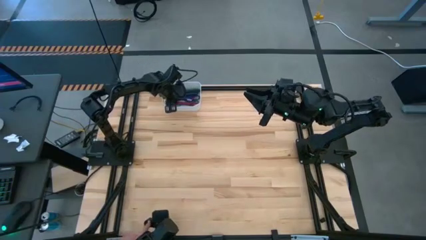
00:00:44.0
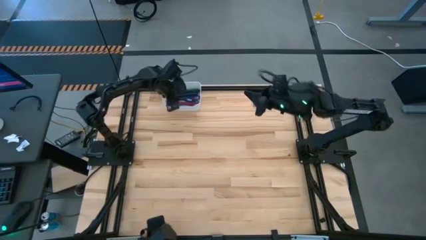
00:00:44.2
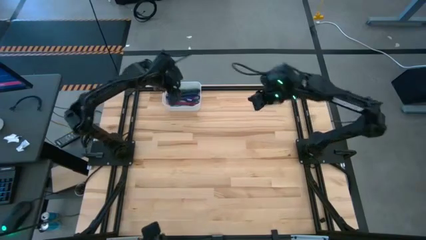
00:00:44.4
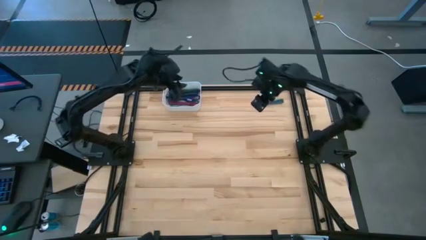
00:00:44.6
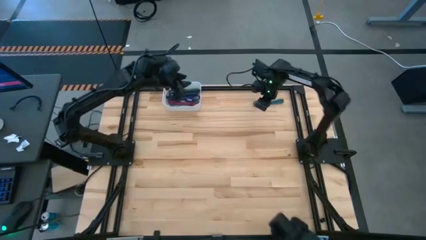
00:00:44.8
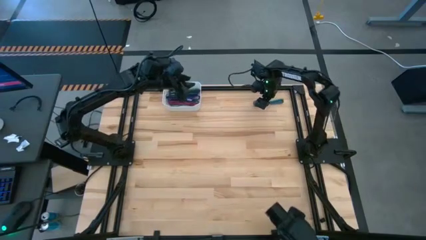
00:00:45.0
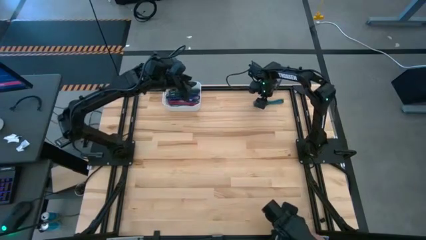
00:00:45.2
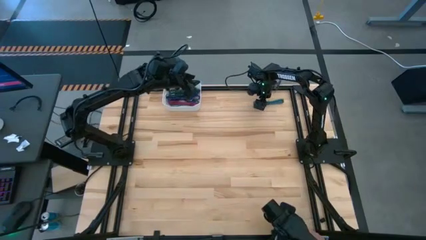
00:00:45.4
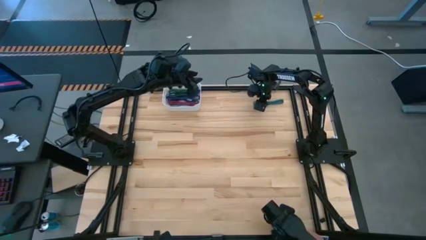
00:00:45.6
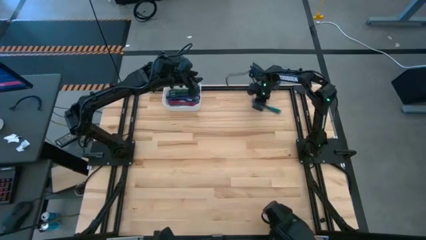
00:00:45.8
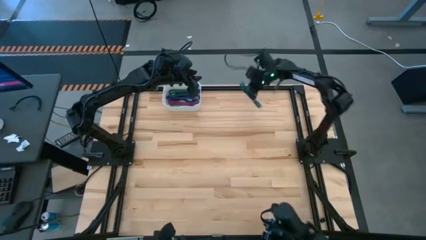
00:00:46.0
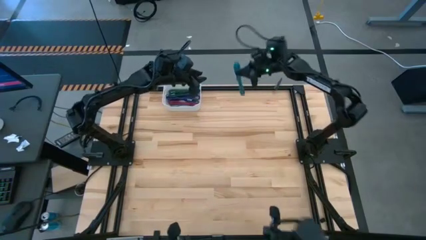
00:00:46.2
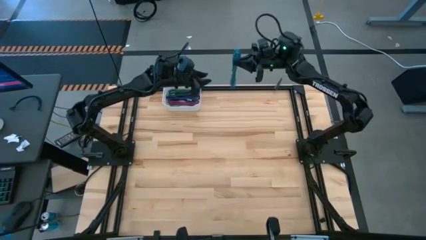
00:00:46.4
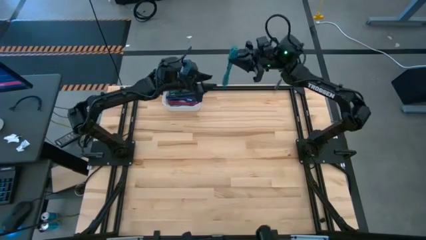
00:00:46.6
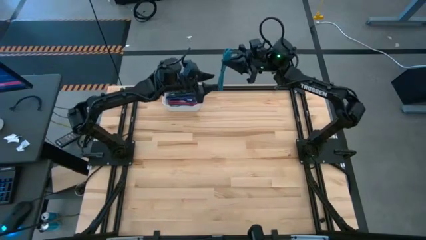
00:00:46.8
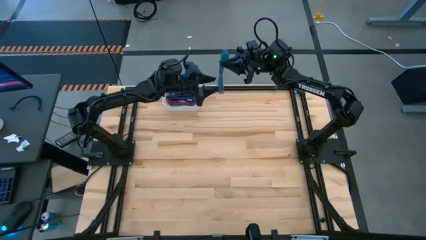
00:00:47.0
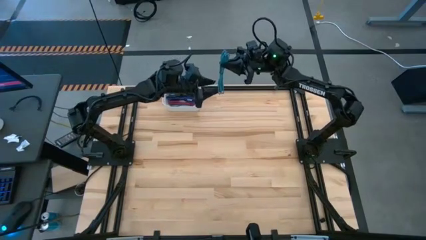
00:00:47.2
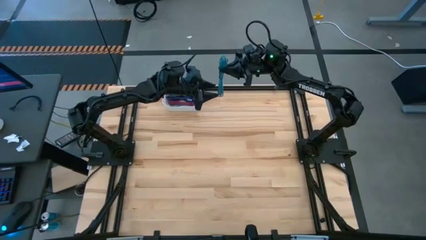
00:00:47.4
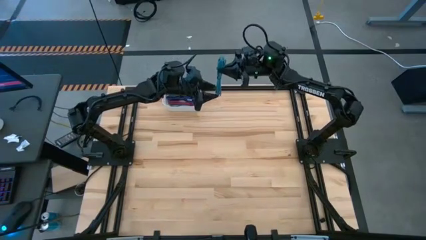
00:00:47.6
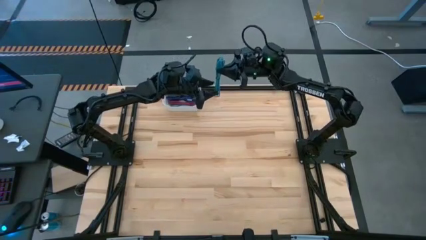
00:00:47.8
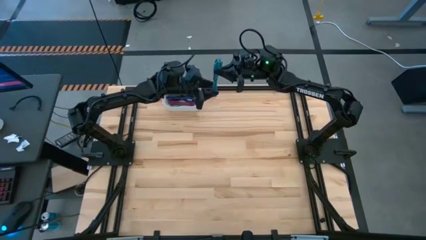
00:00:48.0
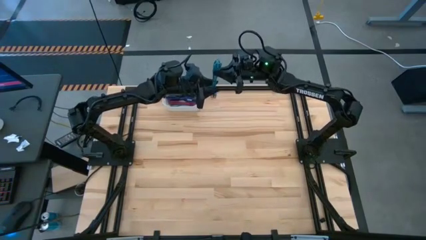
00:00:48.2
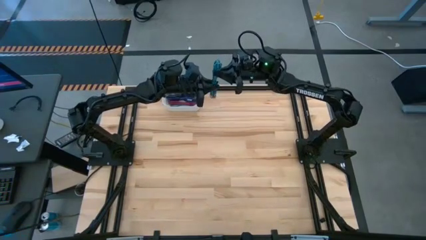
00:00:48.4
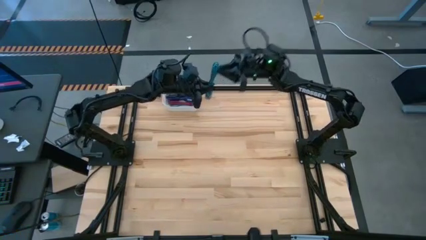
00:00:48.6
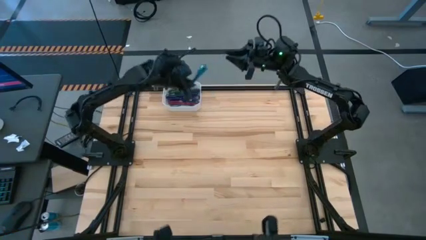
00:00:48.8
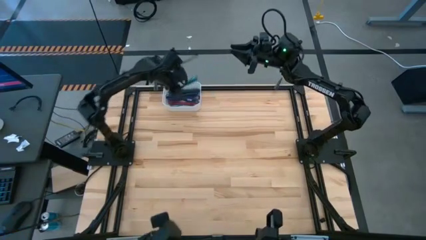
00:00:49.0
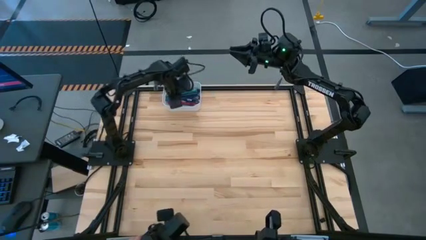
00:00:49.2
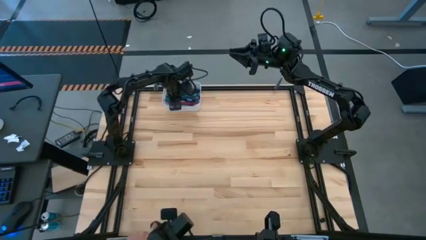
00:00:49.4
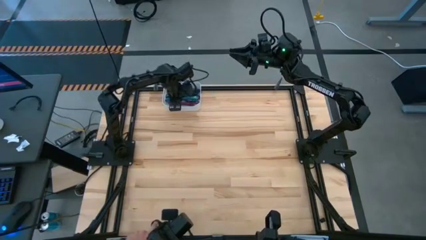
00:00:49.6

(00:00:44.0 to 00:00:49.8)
Task: Pick and place USB-C Cables
Put the blue charger cable into the white bin

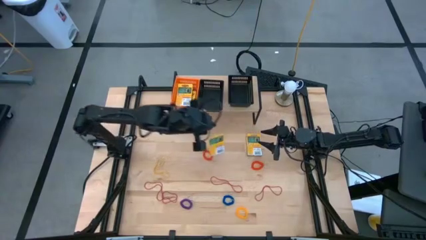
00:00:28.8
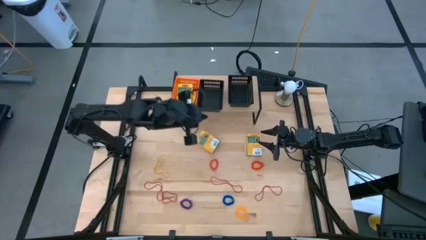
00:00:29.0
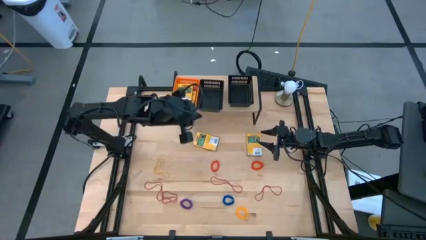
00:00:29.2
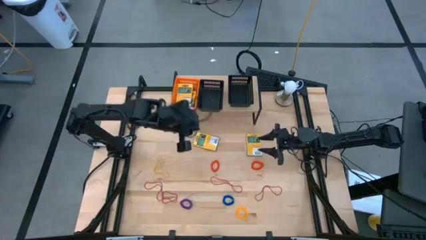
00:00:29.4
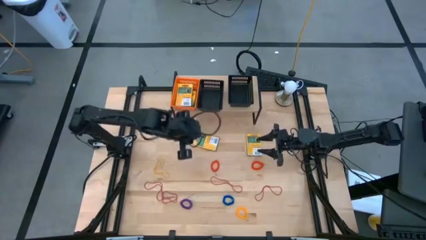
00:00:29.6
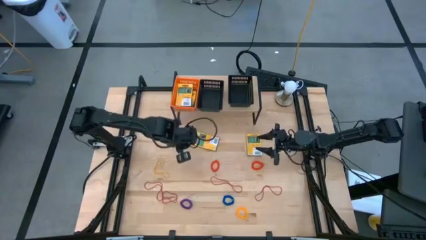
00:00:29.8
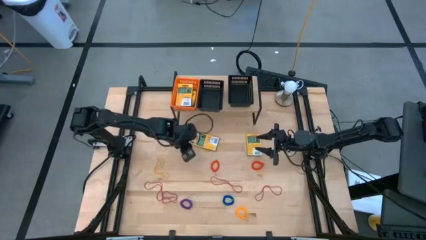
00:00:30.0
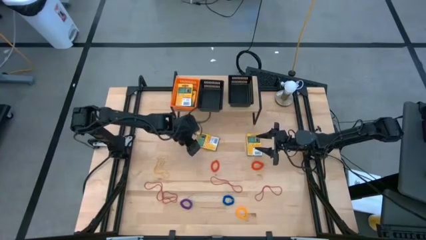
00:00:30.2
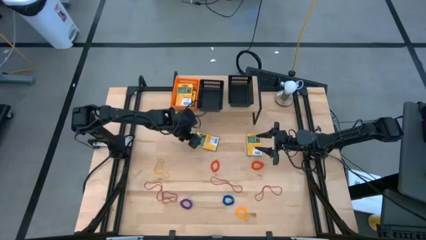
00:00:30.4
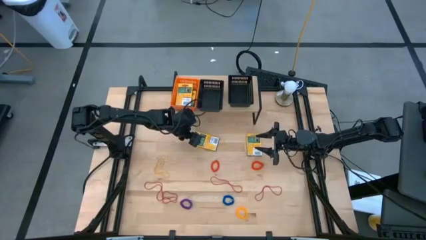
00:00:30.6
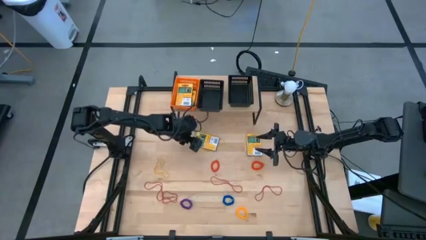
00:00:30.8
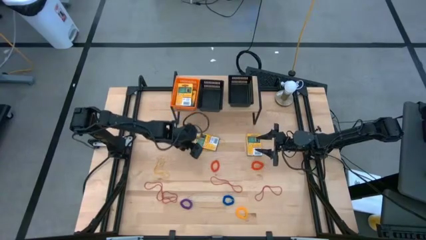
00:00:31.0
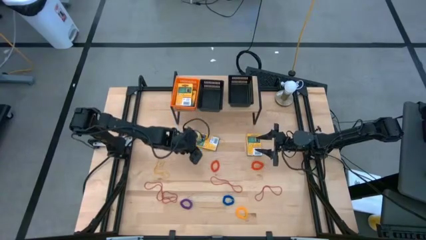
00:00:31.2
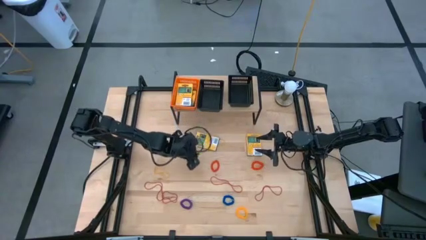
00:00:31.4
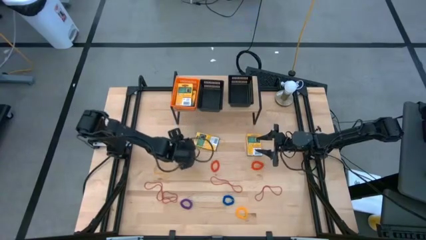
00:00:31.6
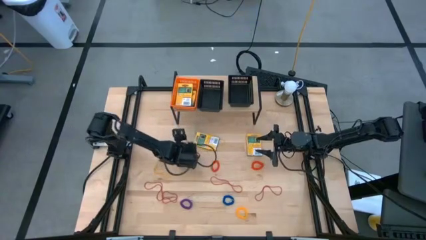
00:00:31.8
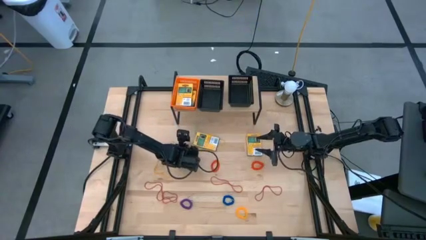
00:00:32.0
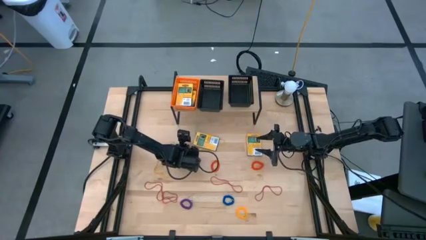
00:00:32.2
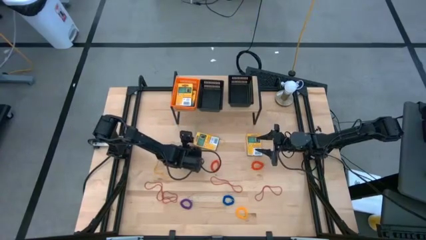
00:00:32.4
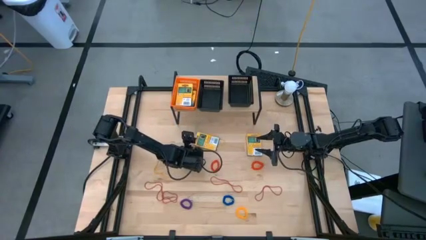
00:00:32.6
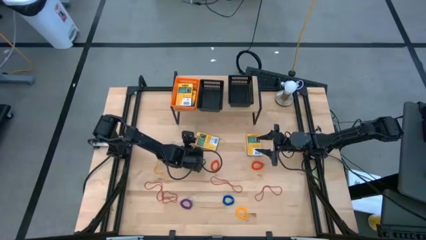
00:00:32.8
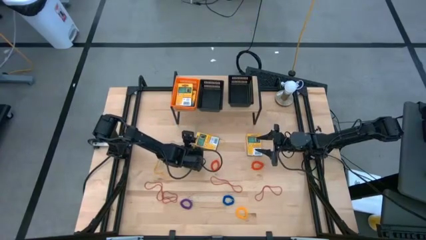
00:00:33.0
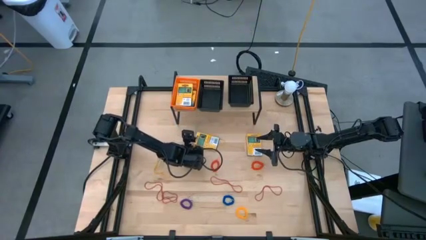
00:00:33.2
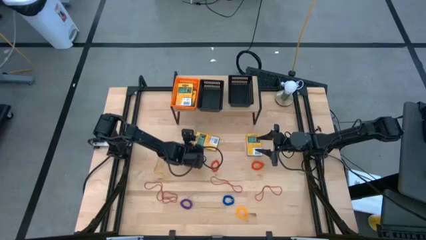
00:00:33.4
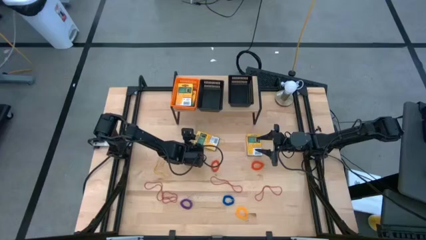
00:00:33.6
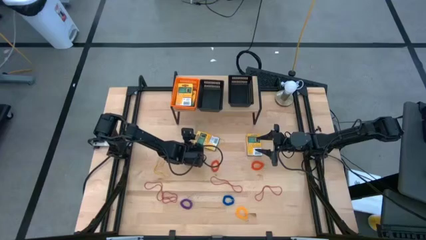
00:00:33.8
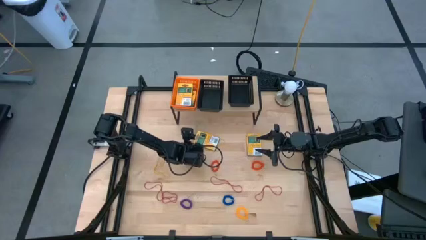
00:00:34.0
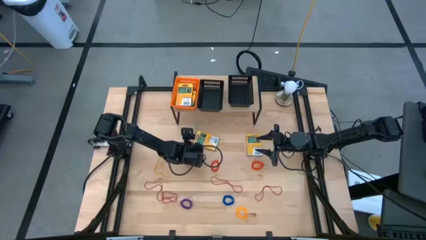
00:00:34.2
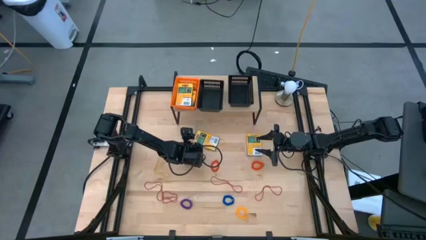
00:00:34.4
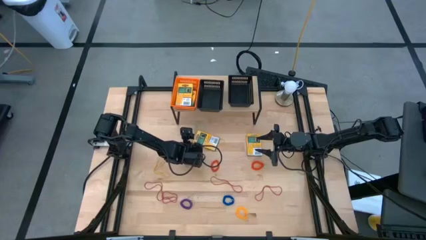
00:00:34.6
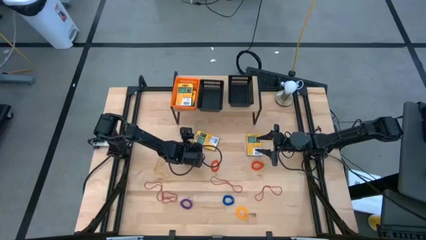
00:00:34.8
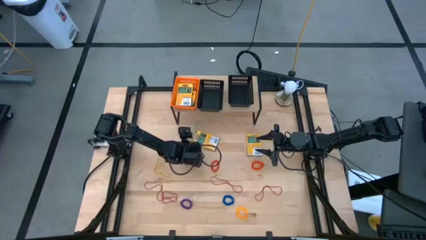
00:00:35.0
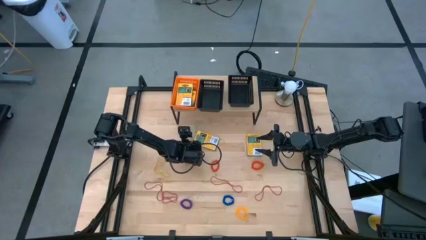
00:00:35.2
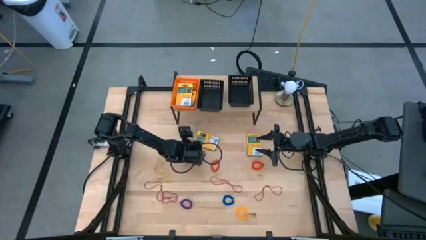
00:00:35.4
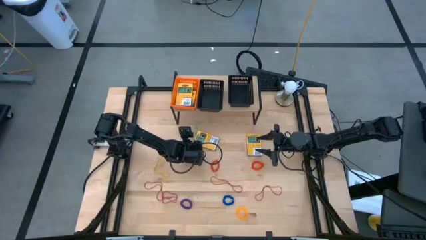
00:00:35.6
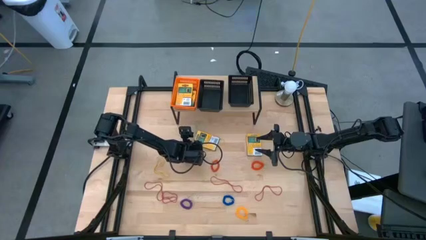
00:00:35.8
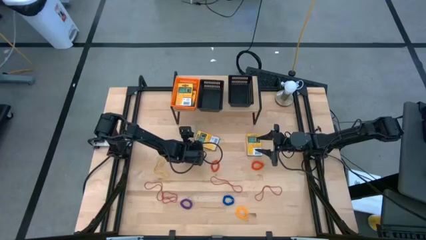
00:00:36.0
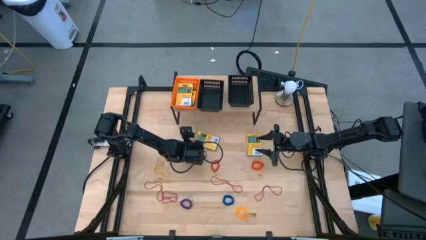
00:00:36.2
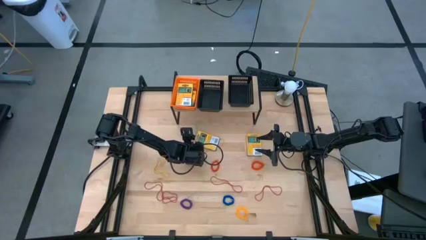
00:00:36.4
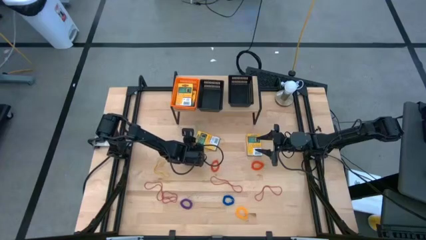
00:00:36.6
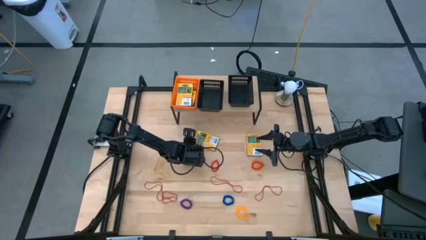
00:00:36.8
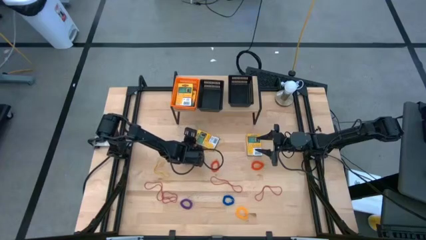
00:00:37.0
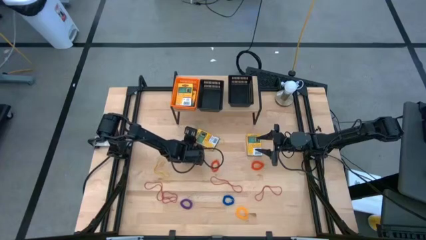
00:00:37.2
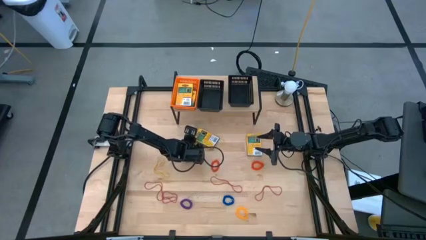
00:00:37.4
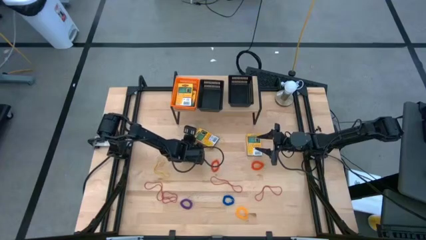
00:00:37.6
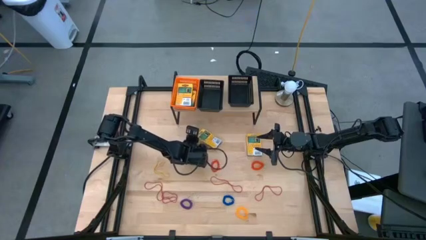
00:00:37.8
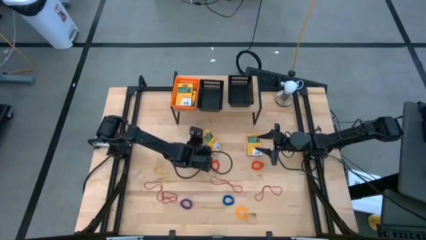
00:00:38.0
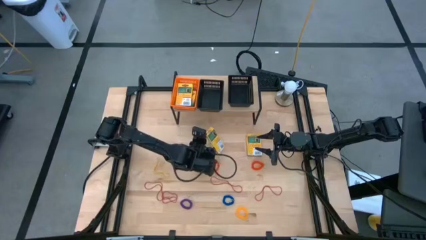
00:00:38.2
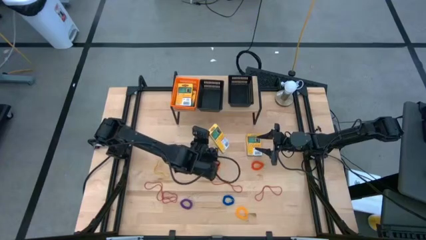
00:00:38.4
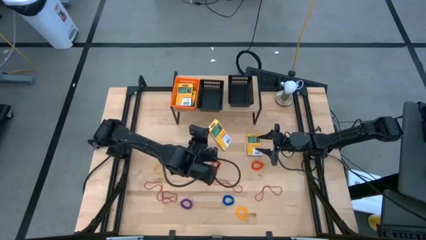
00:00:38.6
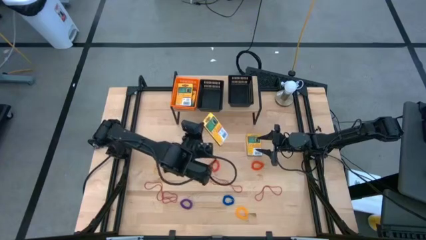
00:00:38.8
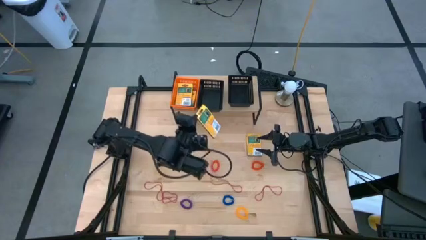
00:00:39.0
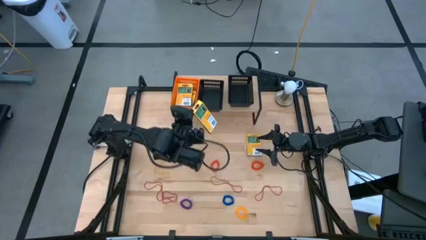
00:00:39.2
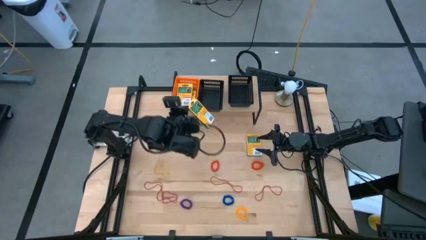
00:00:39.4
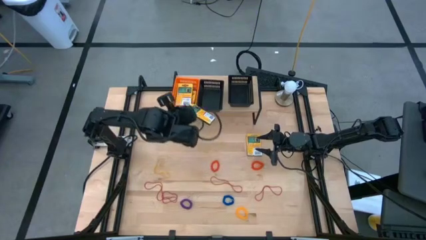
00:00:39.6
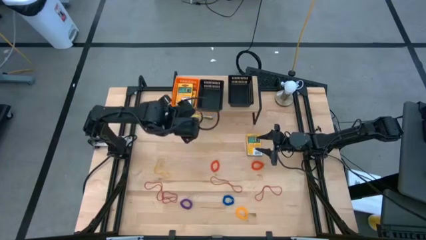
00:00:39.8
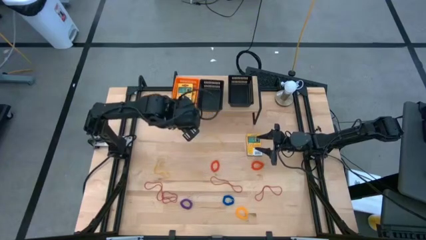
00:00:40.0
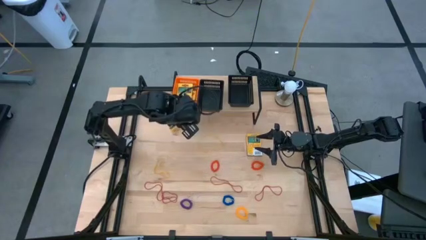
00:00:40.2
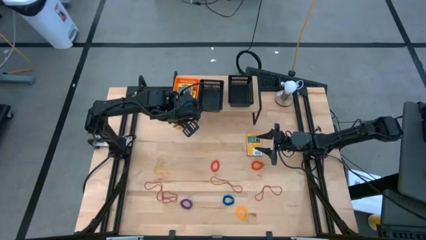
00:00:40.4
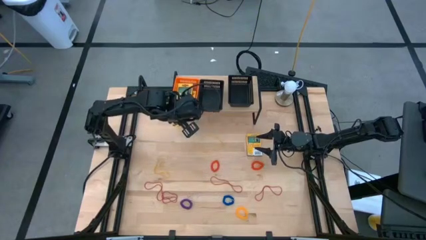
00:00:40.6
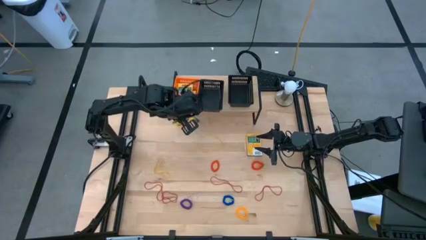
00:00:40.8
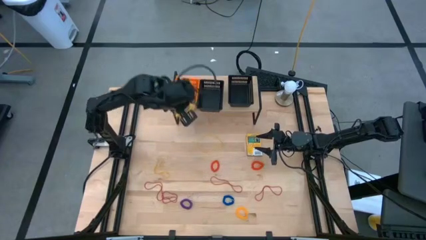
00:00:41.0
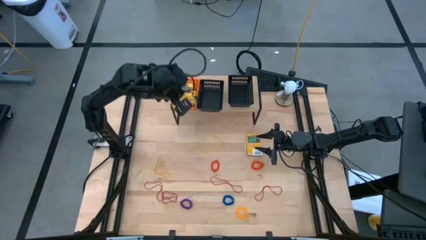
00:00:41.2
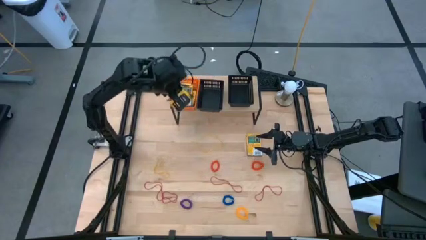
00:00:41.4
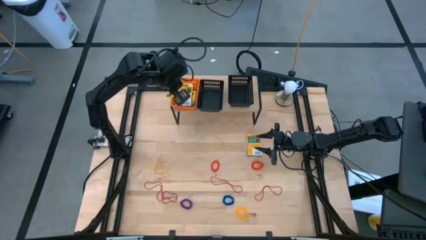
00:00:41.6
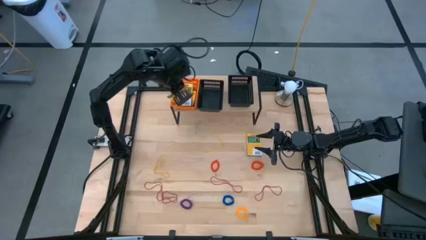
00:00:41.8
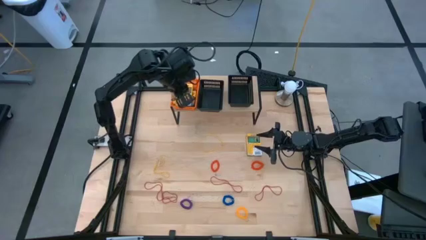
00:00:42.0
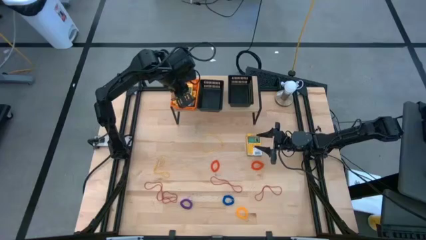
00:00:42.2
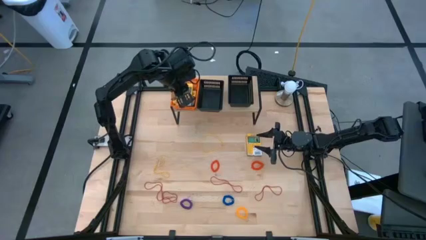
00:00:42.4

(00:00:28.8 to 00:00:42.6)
Task: Pick & Place Office Desk Supplies
Put the yellow pack of crayons into the orange bin on the shelf
